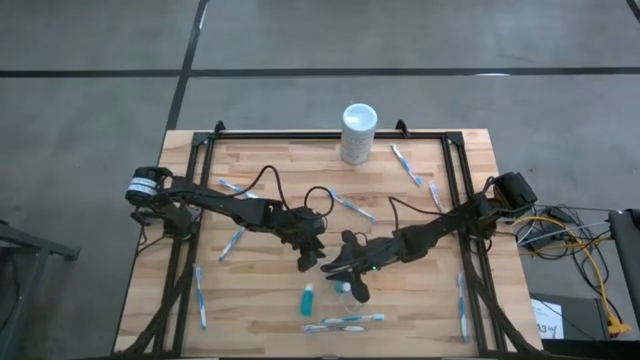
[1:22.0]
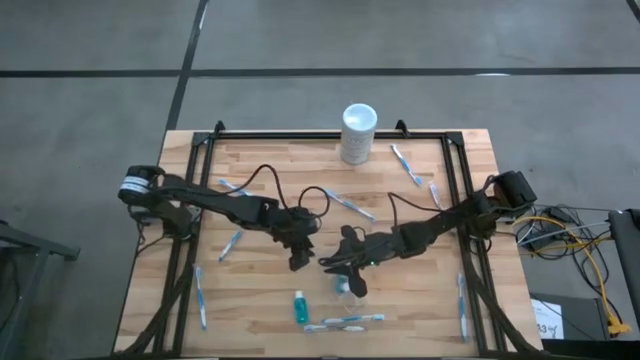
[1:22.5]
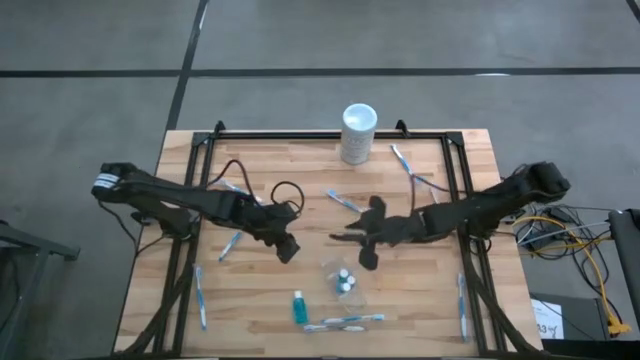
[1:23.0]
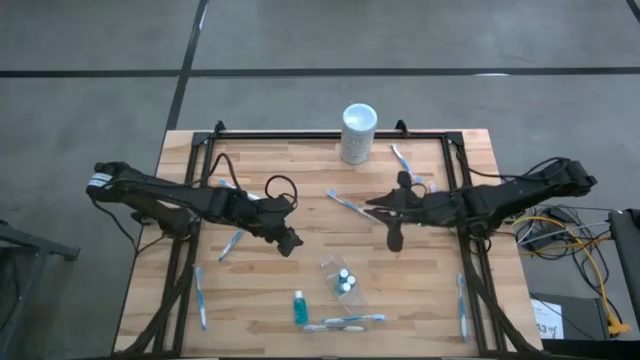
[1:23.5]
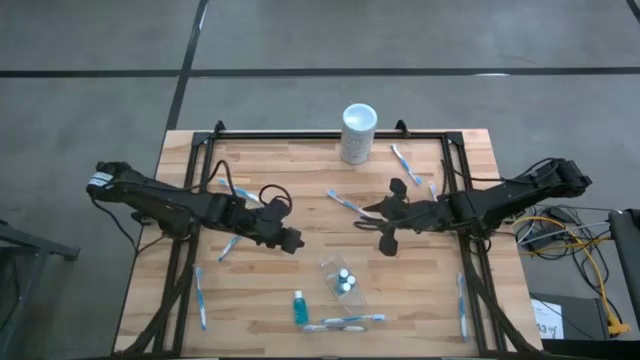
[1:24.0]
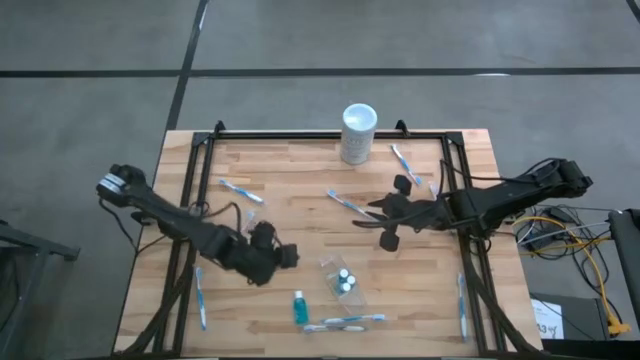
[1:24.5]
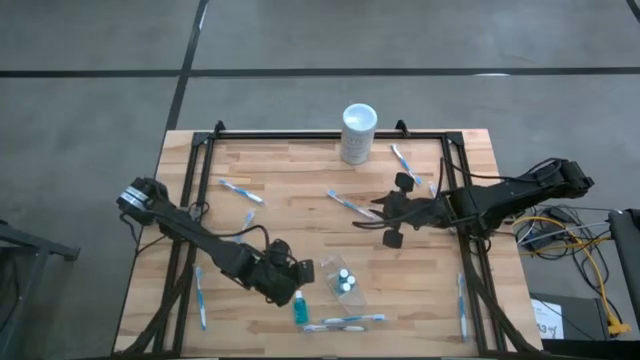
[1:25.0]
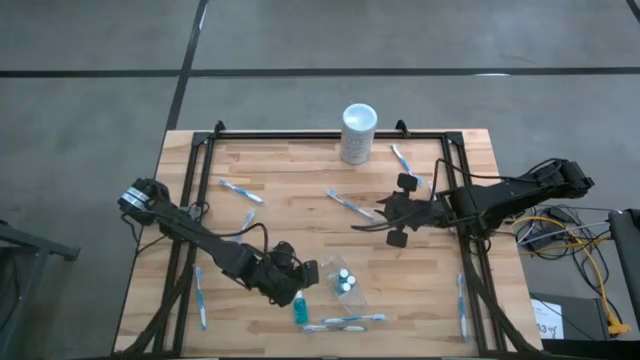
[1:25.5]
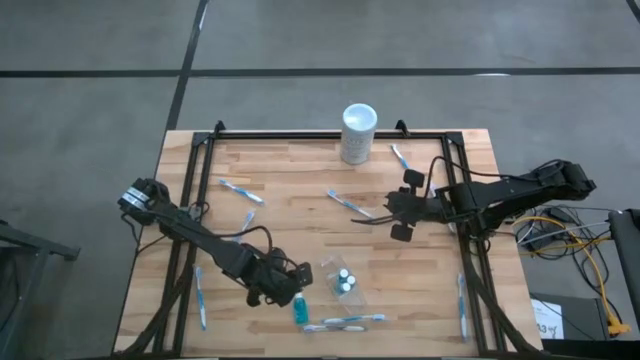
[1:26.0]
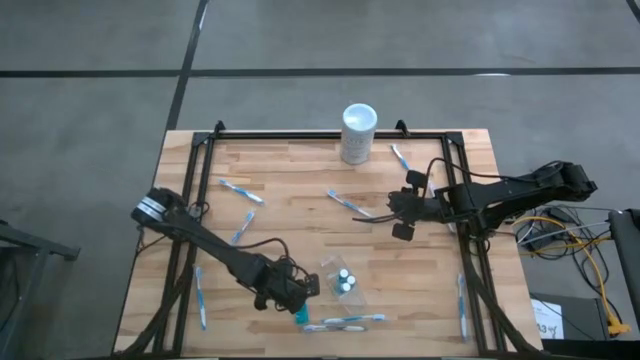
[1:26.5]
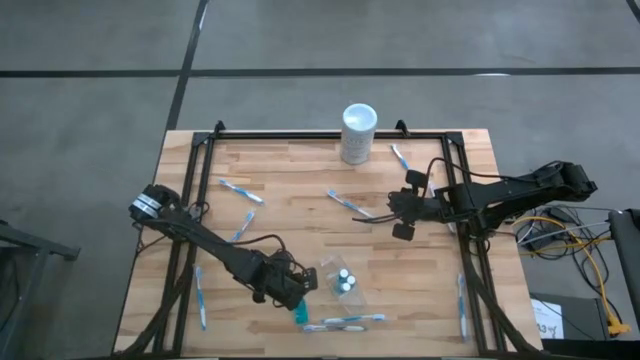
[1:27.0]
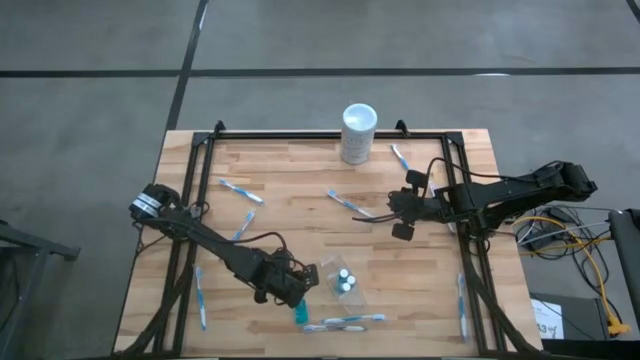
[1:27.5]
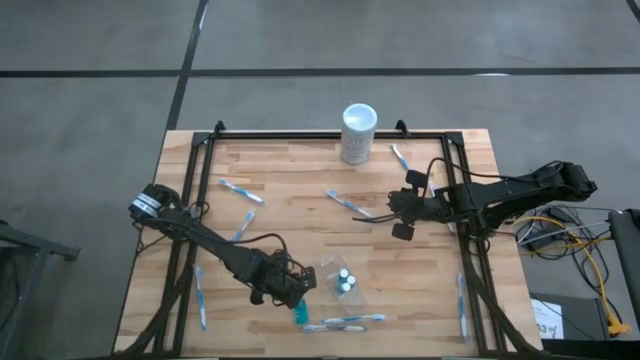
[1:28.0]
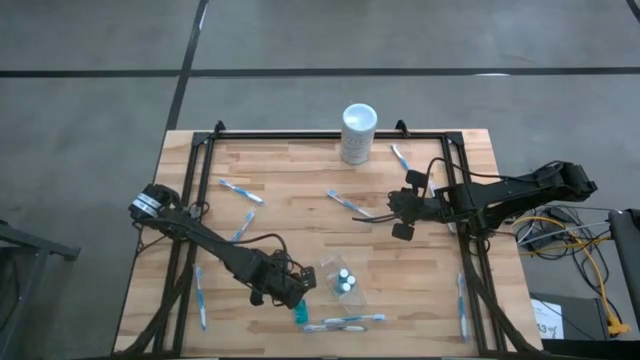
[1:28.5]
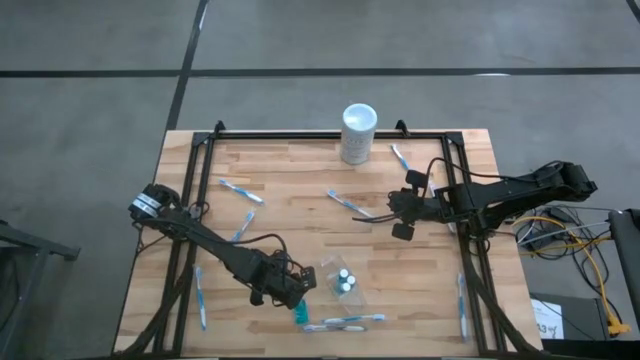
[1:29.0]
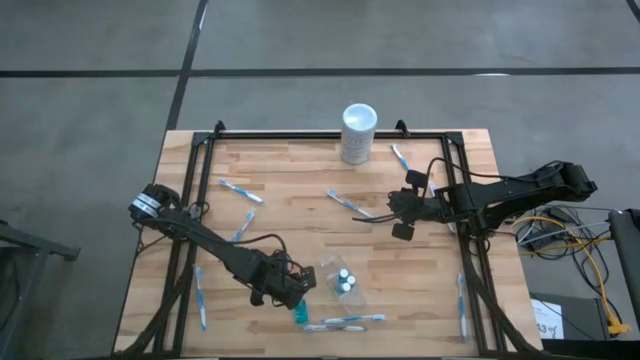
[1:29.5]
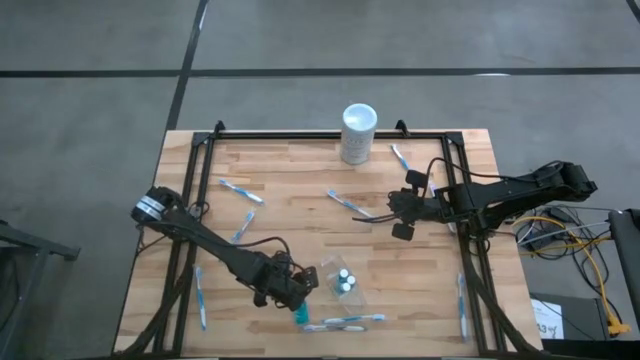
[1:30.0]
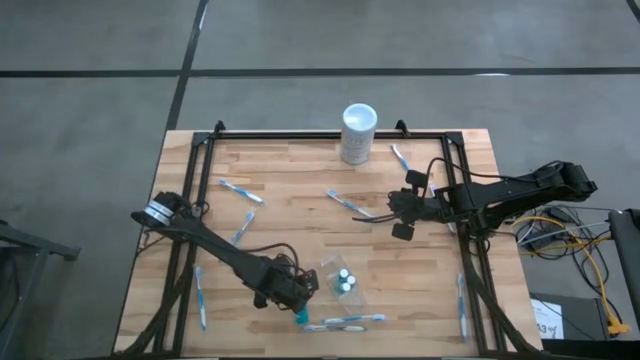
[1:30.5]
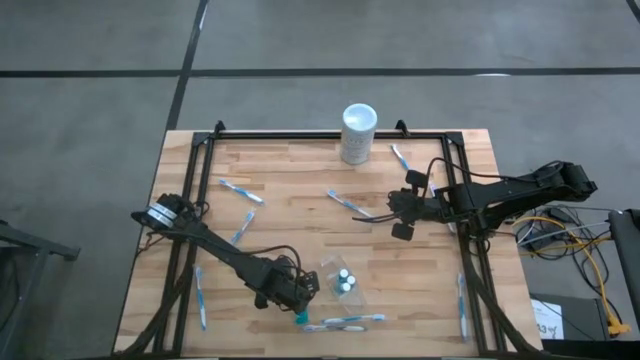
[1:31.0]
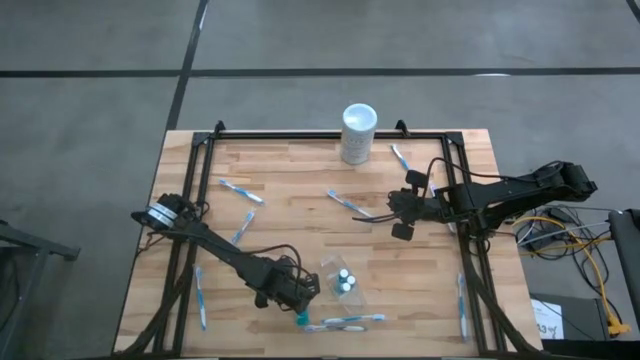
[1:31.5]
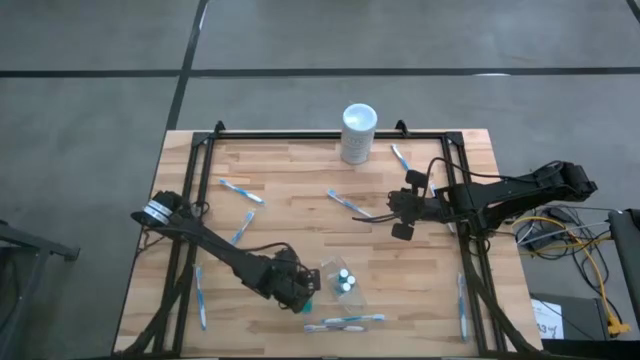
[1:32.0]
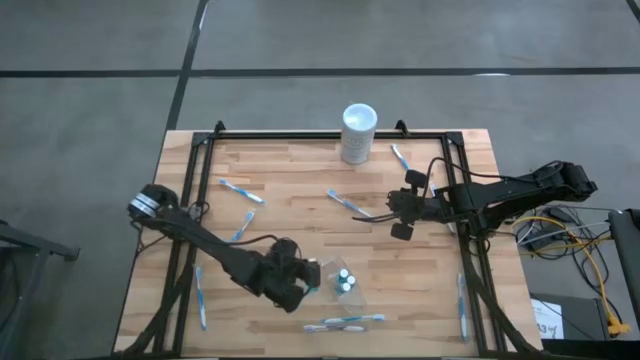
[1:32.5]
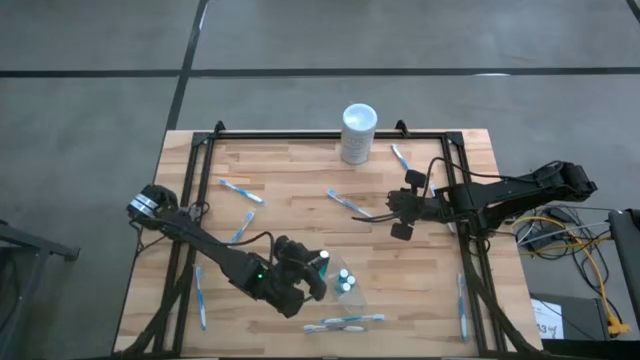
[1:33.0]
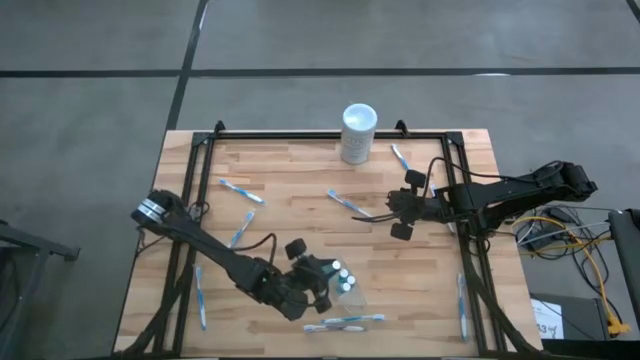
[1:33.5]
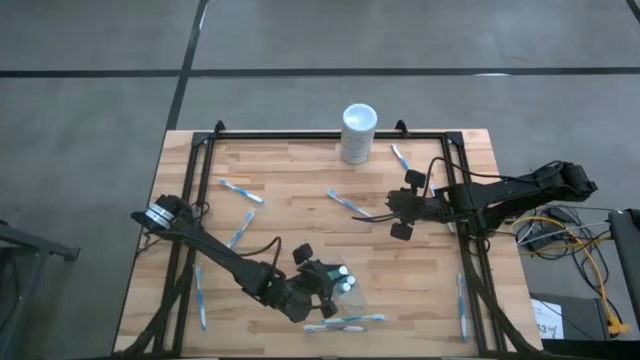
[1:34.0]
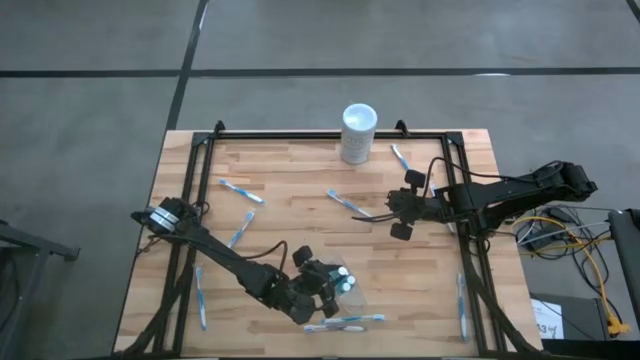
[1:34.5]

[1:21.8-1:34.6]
Task: Pick & Place toothbrushing station
Put the blue mouthwash bottle into the transparent organizer

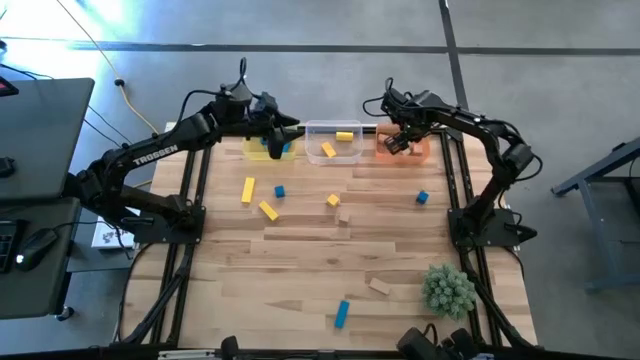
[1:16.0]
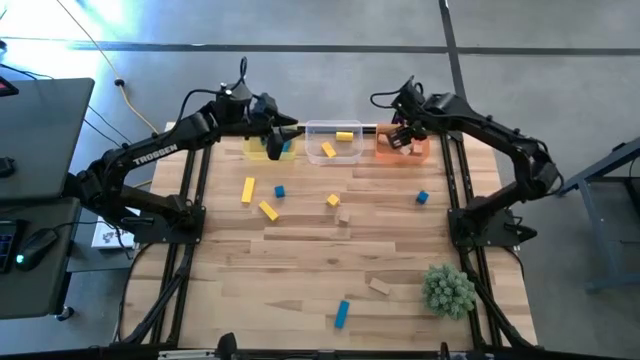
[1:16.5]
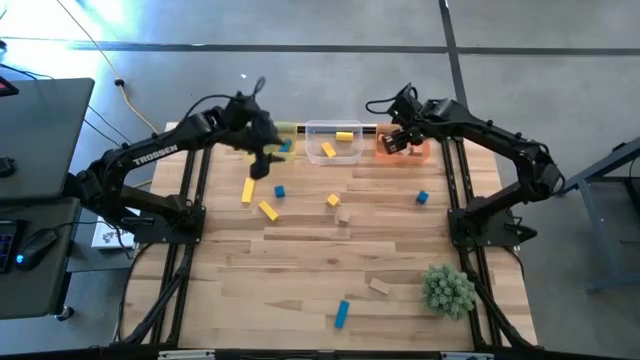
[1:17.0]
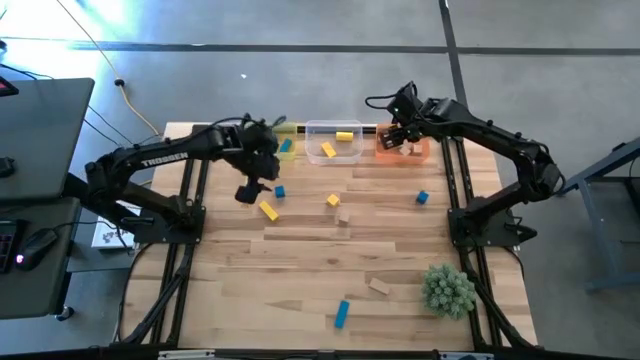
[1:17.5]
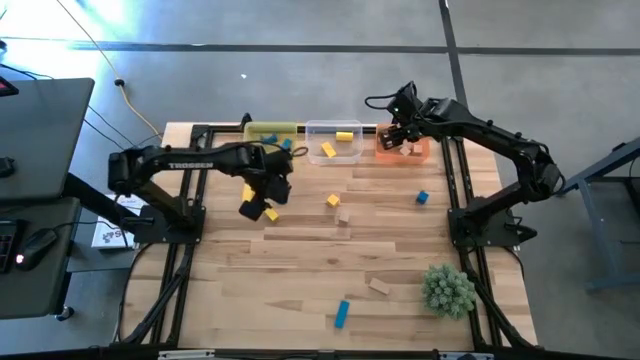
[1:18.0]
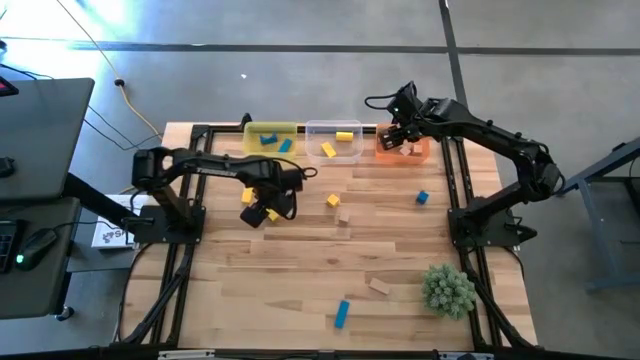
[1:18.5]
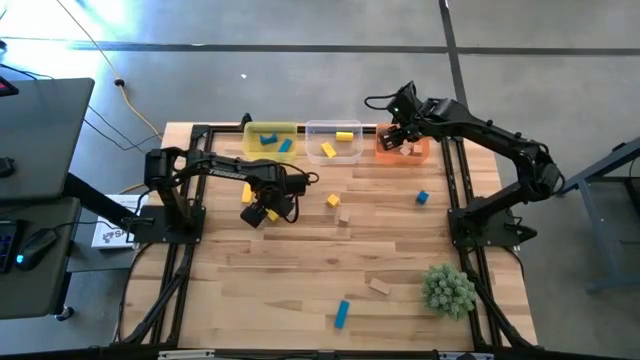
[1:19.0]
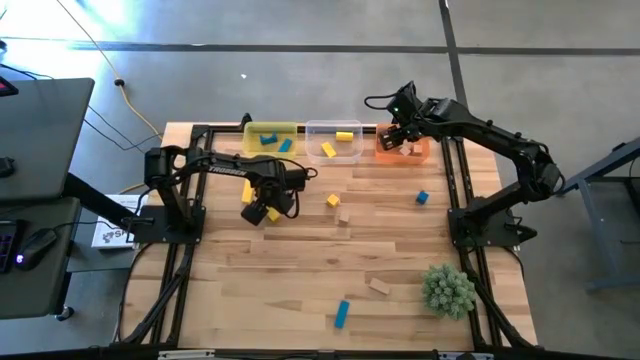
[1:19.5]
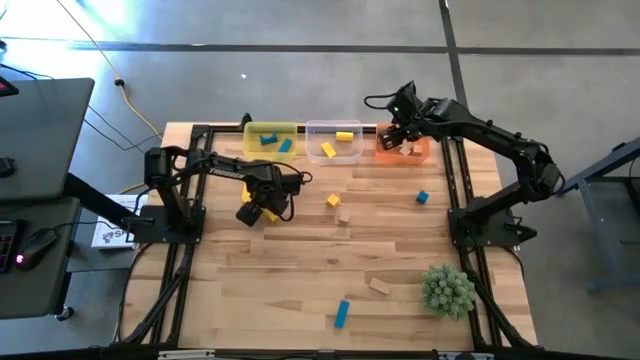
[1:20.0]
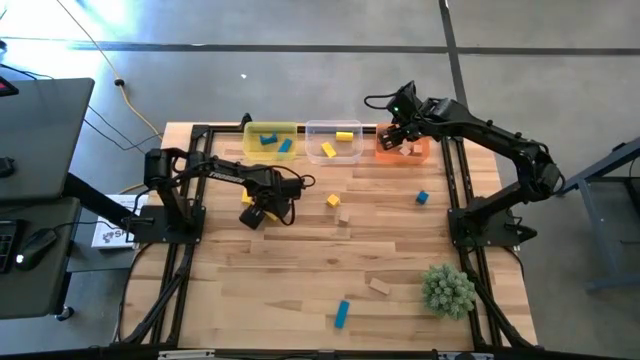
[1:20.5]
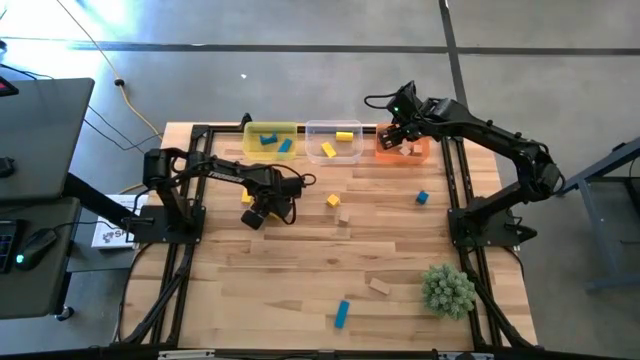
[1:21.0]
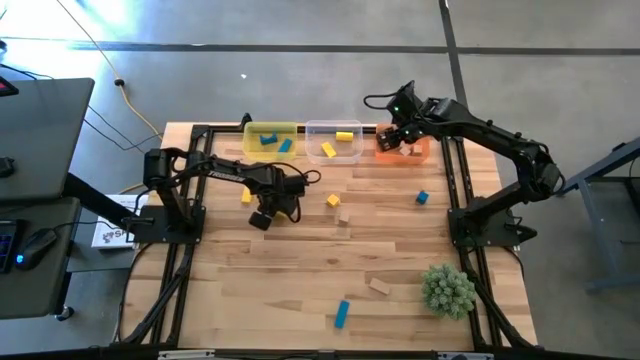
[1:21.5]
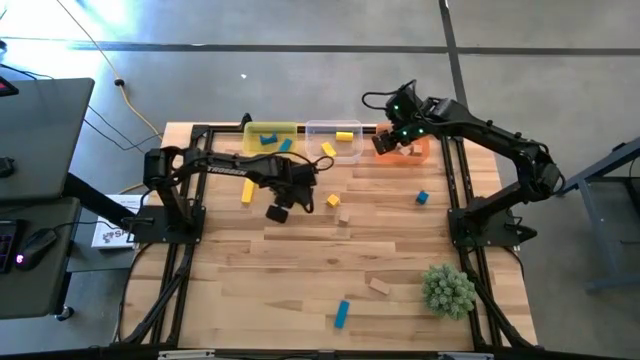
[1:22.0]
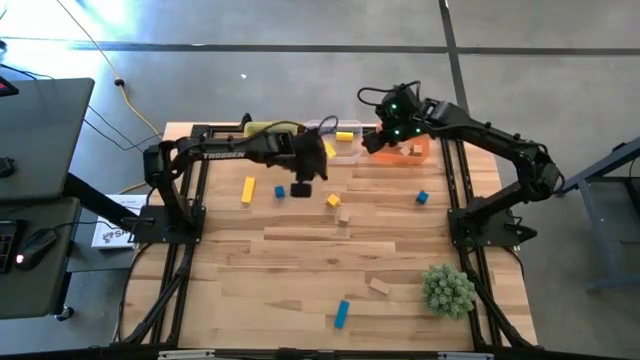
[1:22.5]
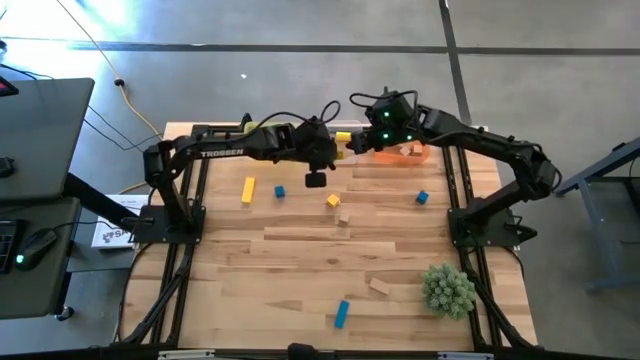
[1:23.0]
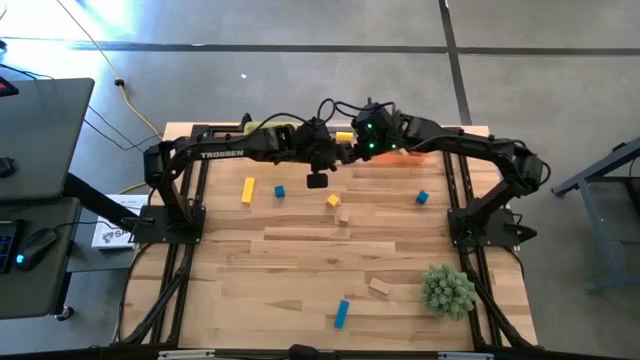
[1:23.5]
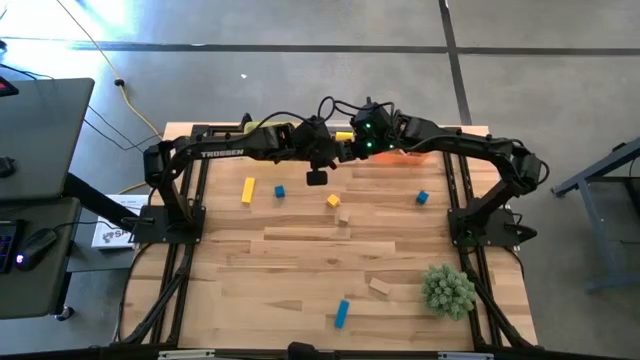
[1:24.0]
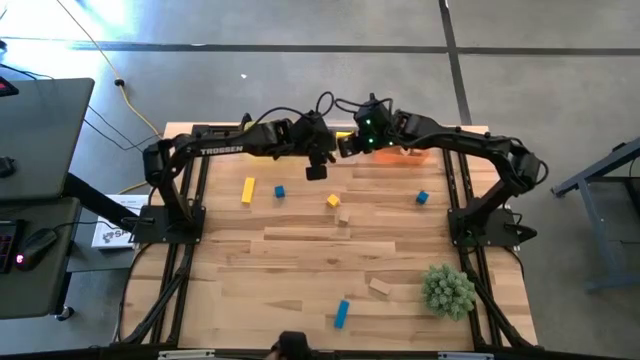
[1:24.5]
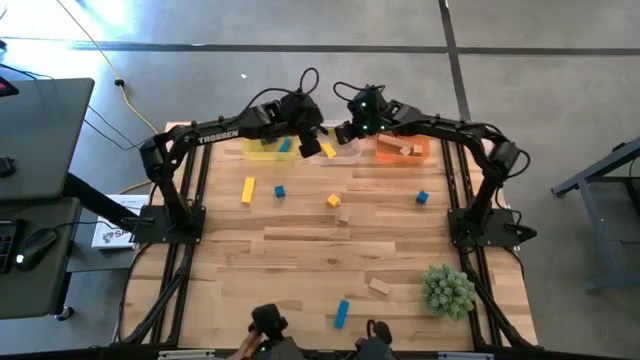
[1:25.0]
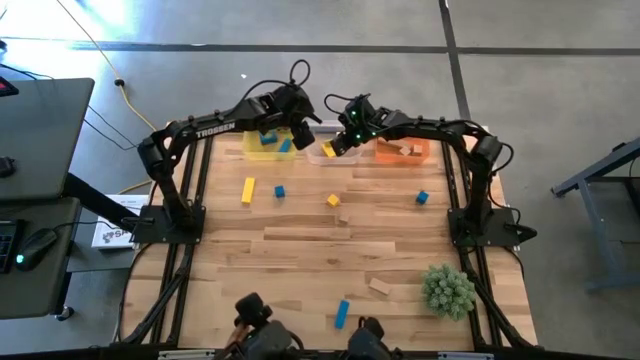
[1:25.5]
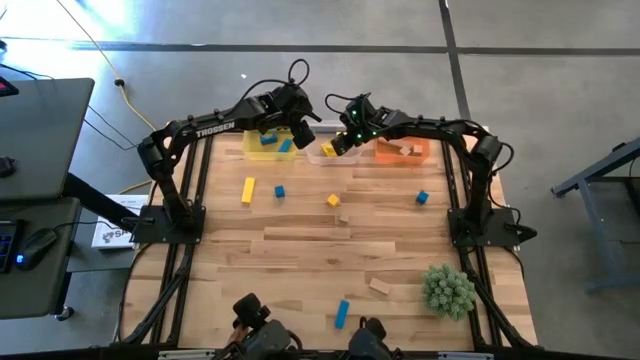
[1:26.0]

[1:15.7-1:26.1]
Task: Sort & place blocks by color
Put the yellow block into the transparent bin
